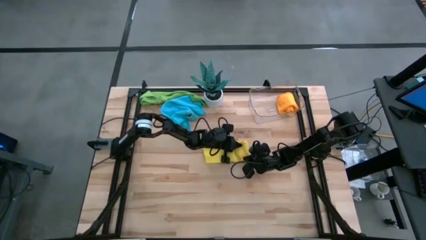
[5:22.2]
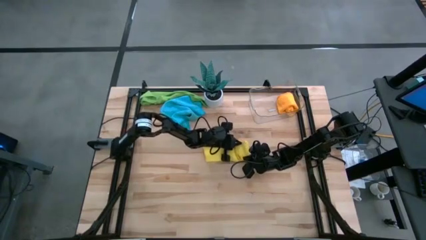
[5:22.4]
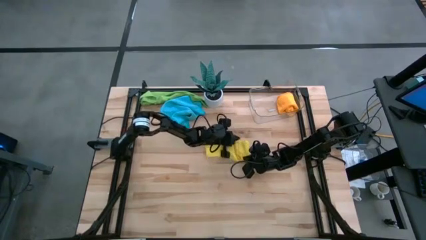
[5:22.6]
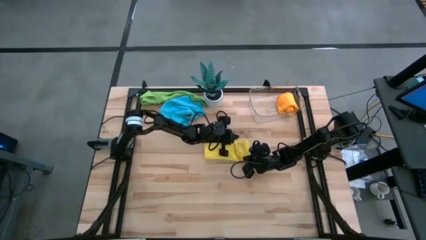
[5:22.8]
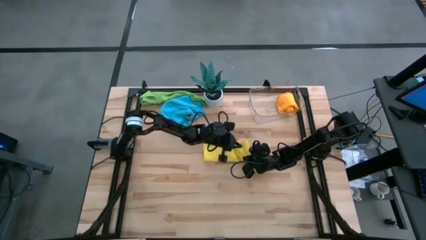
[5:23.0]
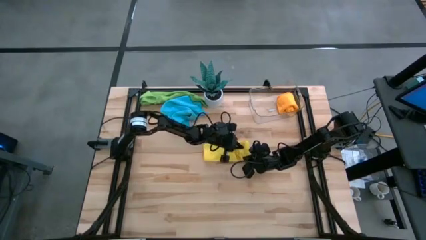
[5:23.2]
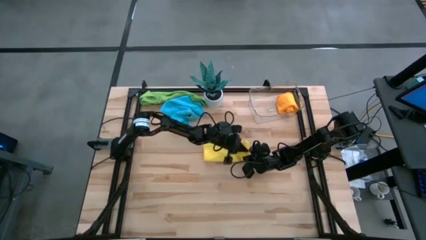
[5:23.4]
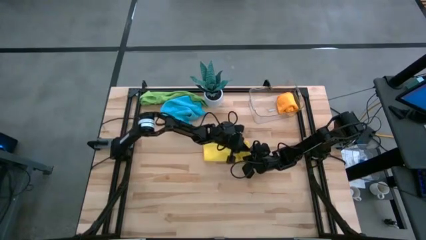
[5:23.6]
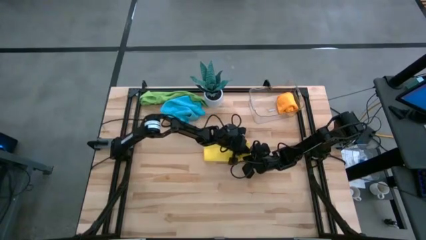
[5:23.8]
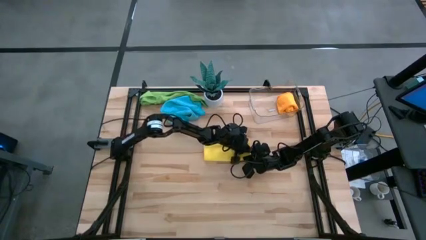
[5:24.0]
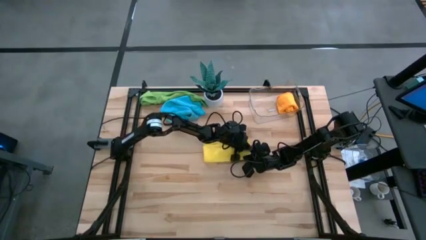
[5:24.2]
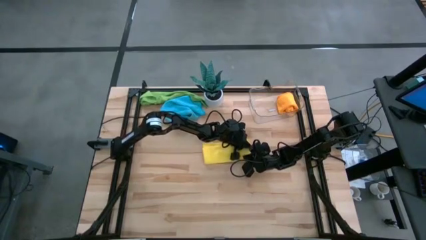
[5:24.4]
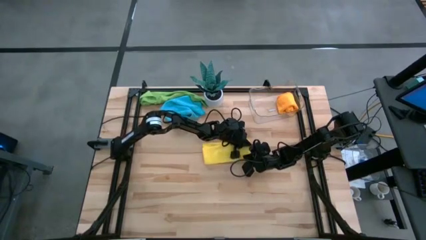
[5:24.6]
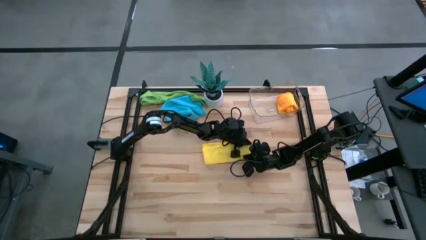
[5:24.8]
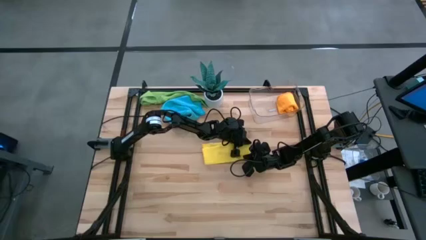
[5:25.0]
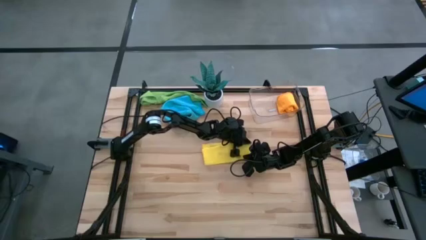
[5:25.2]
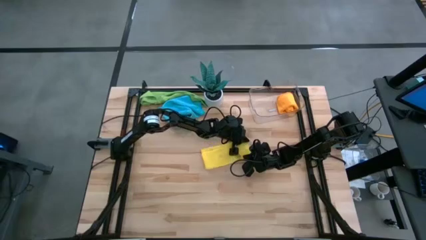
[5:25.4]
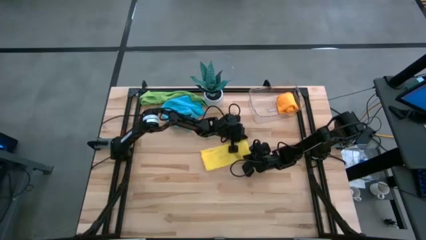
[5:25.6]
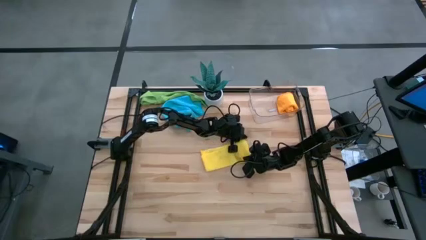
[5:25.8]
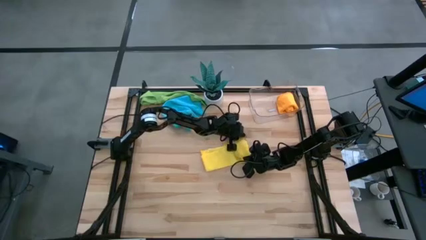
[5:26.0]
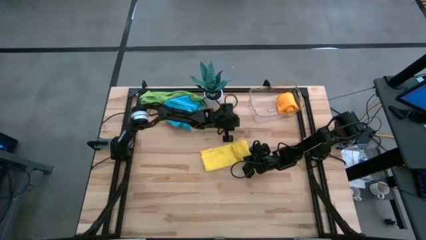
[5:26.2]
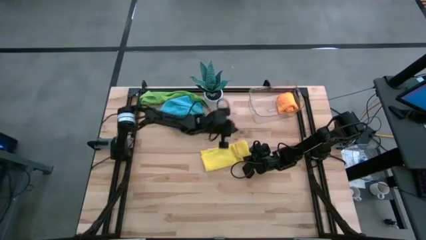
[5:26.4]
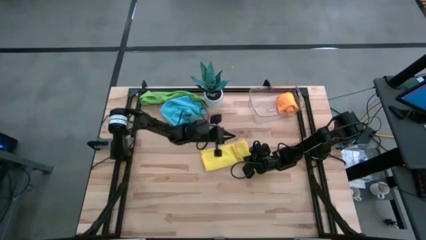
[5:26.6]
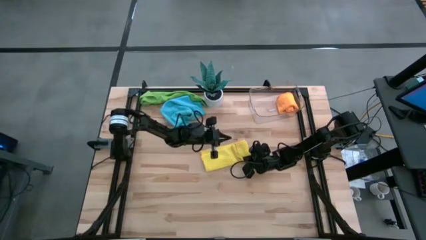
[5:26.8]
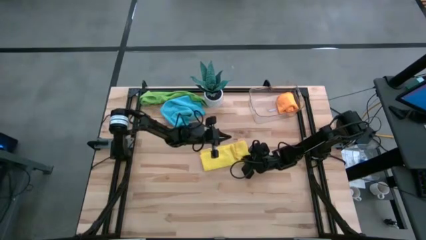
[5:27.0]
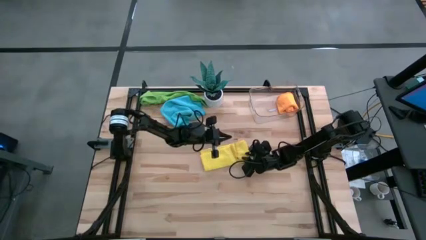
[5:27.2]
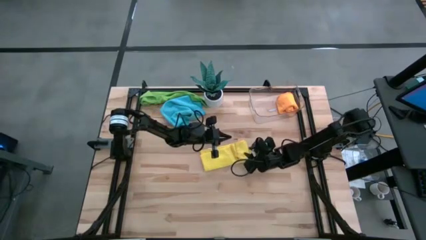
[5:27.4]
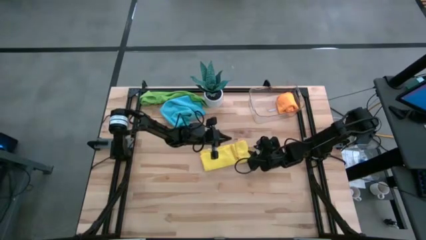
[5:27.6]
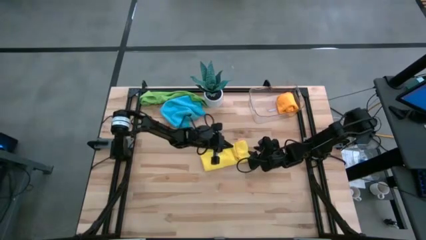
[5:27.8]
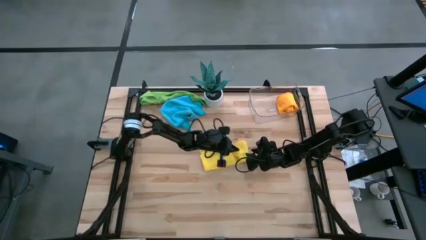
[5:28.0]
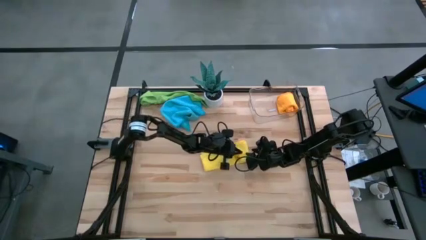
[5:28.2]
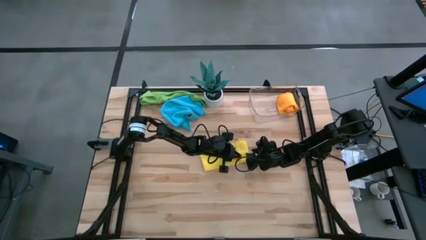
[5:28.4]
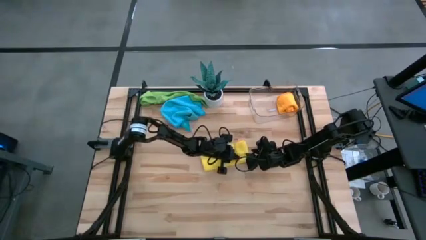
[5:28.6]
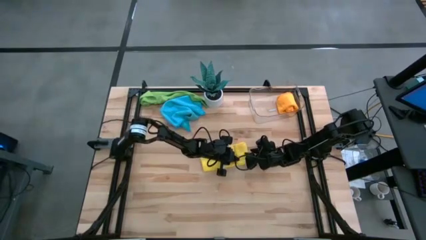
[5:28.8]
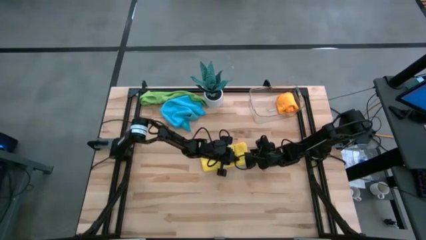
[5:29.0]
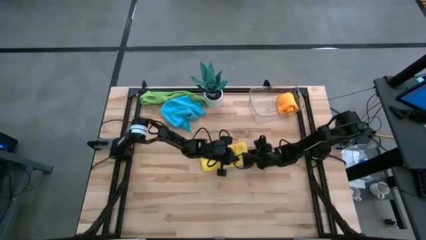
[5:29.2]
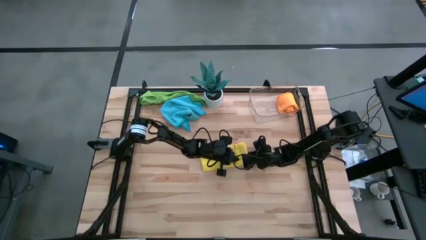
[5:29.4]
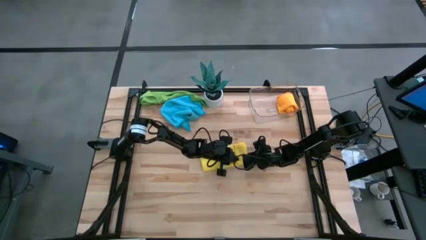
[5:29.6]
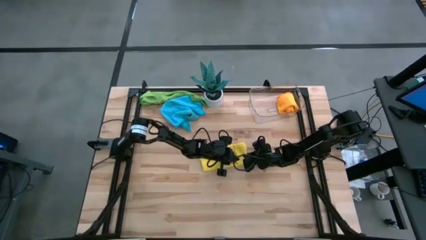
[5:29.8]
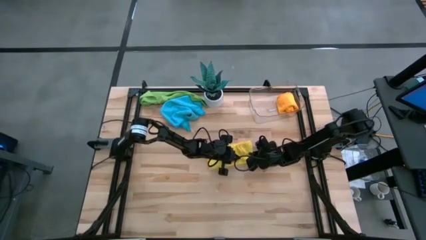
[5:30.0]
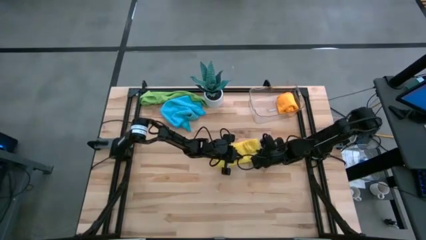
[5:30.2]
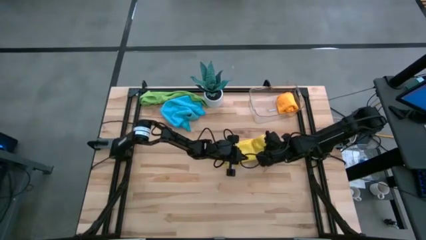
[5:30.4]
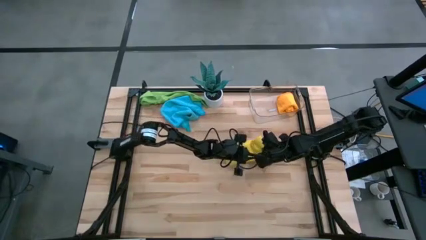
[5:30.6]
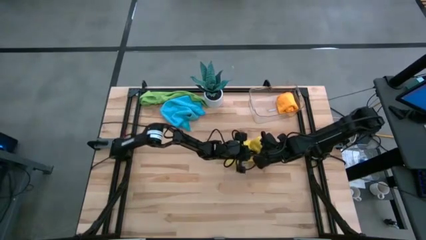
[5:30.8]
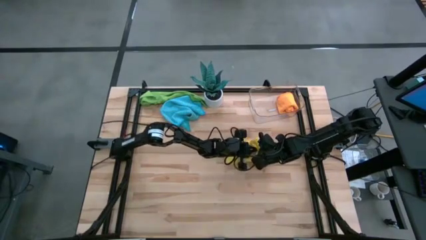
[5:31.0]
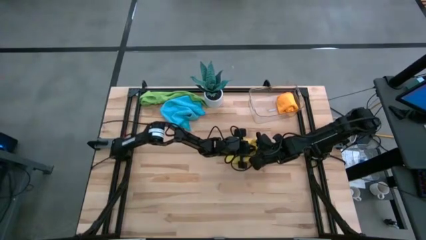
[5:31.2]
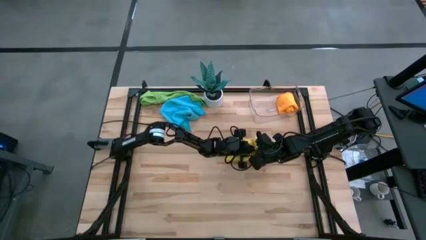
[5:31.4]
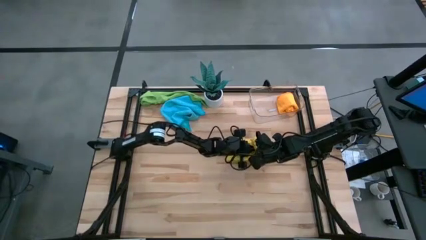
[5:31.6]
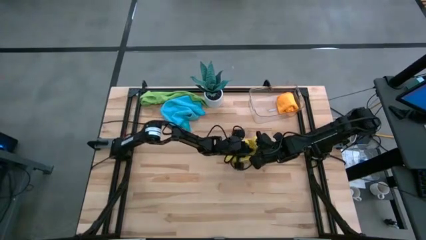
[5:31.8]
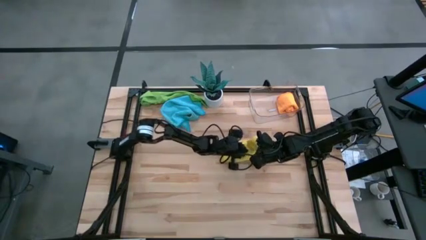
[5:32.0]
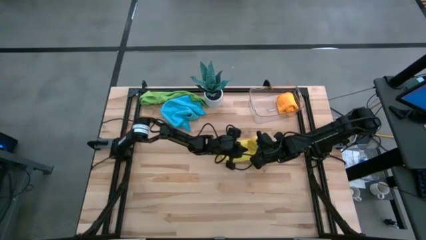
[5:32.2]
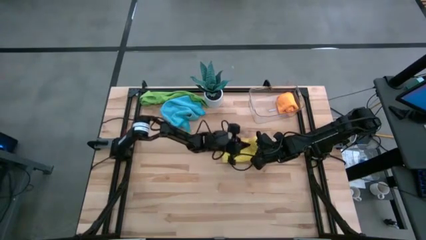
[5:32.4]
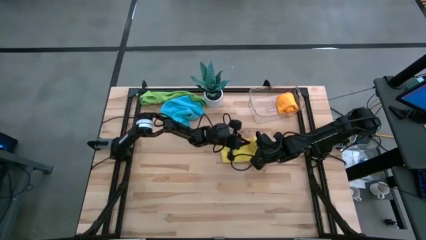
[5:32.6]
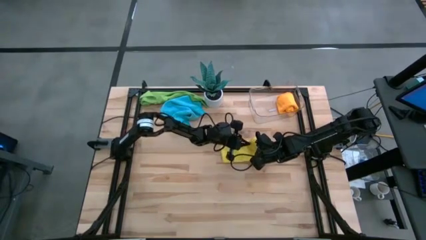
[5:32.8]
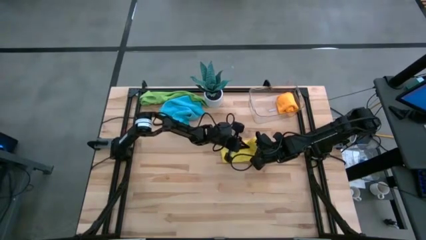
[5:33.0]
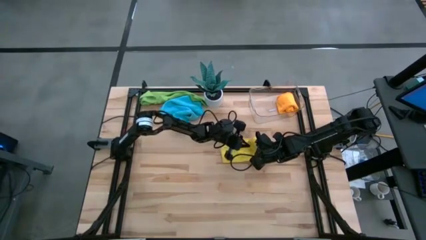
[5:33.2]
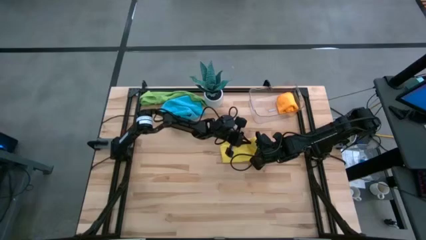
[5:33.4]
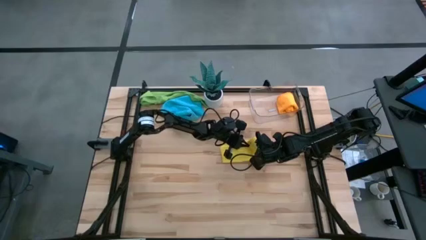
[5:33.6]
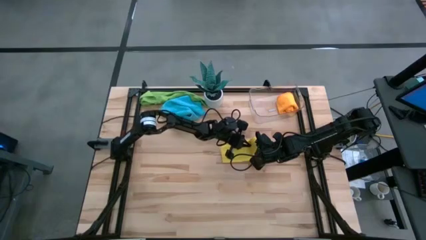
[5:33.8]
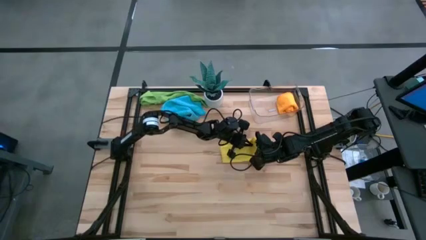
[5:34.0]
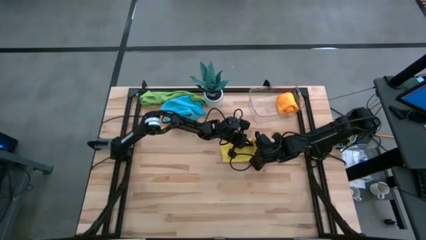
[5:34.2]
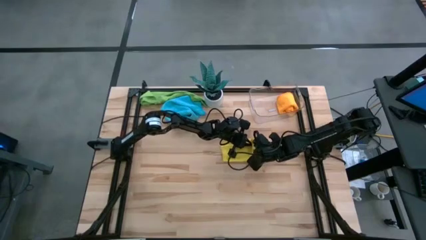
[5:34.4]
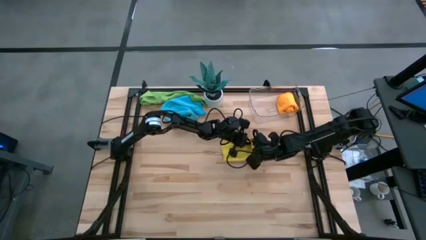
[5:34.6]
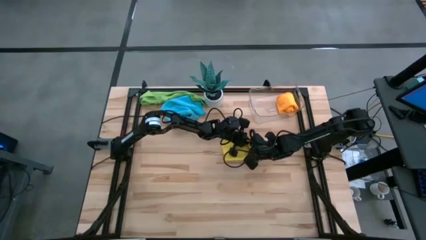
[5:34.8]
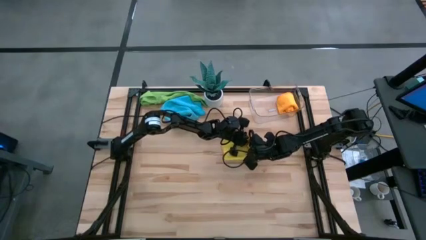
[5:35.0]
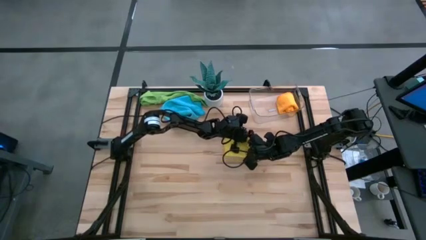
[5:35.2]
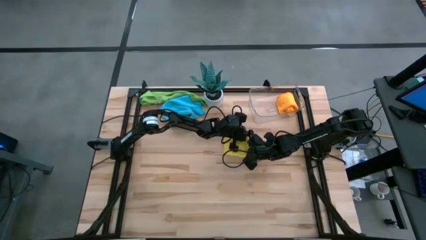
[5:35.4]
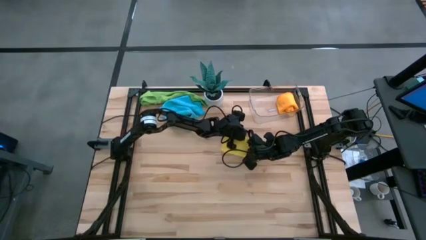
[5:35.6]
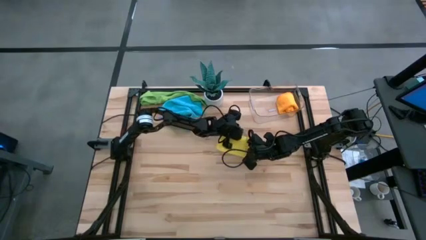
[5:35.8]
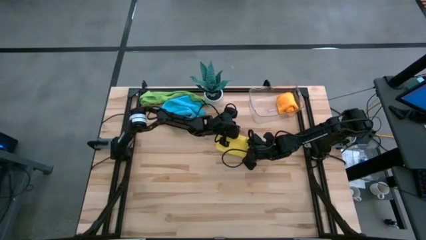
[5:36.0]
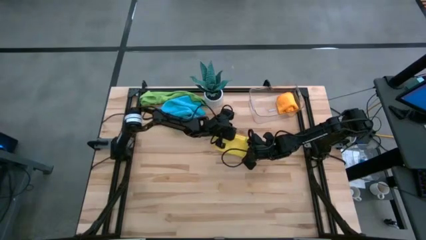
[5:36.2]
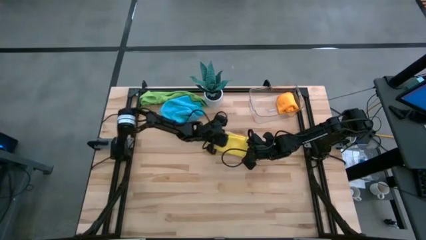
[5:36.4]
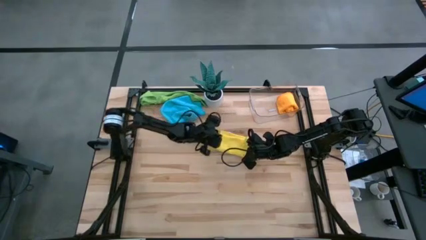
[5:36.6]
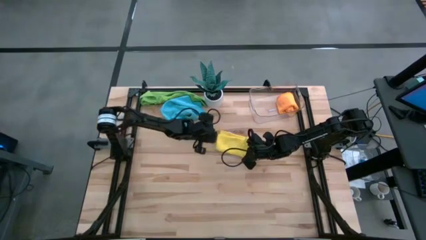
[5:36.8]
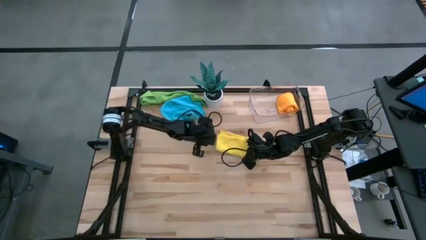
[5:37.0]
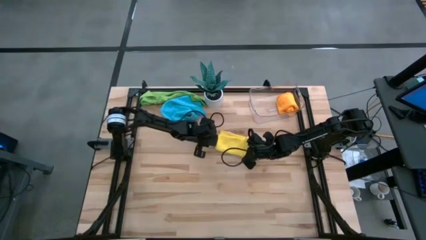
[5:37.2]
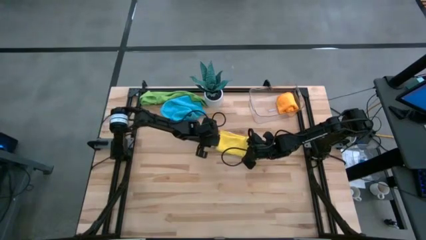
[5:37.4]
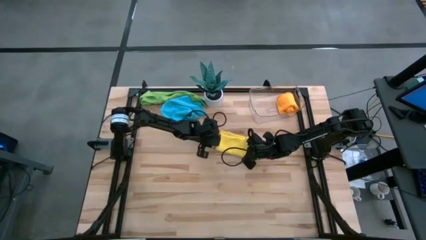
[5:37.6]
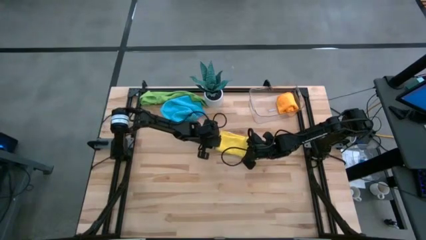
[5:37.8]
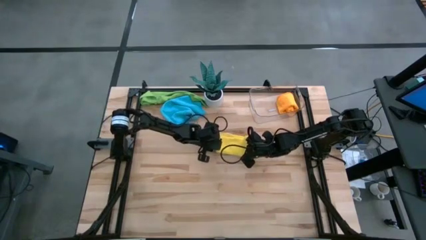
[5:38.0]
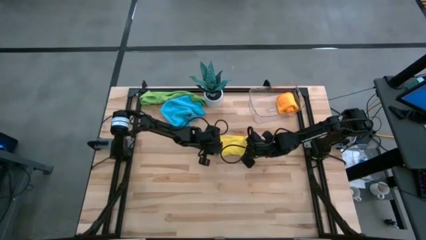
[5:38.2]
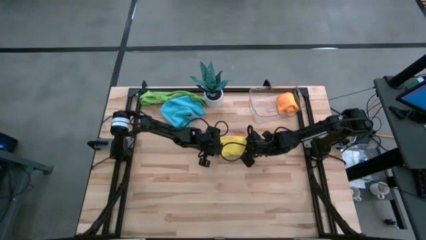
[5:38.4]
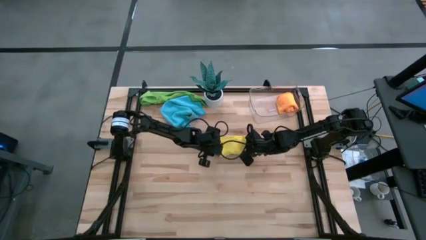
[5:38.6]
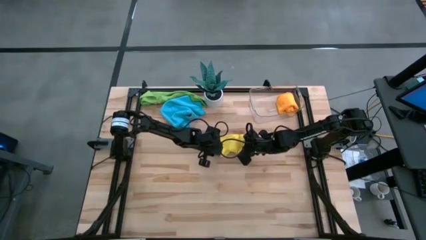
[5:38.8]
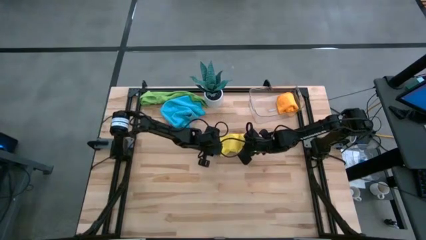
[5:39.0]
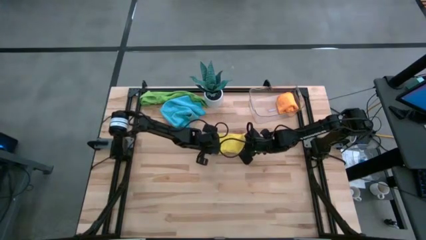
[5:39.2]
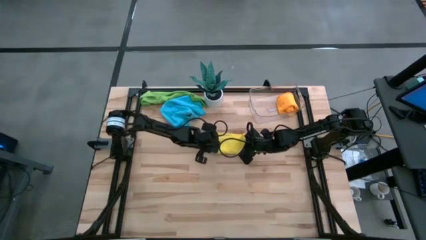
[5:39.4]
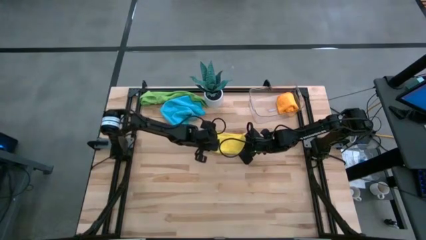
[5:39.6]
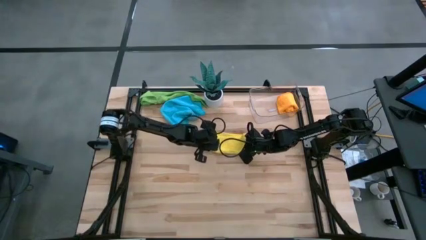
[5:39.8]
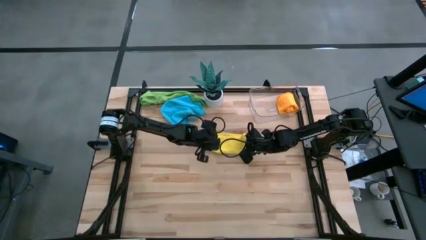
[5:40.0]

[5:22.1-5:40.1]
Task: Roll microfiber towels into tight, uniform cylinder then place into a basket
Roll the yellow microfiber cloth
